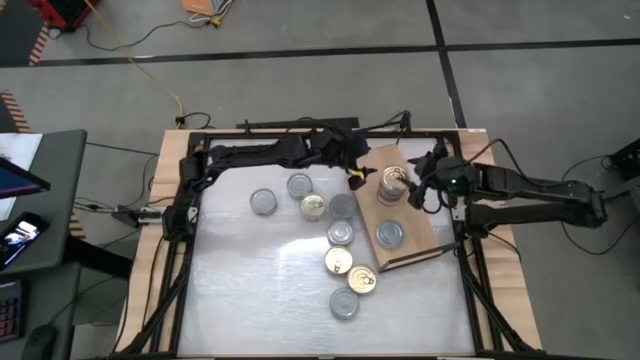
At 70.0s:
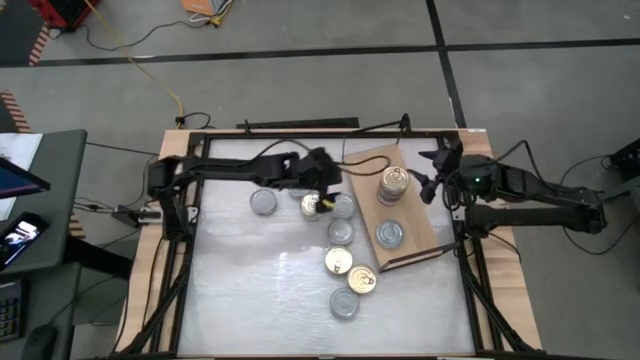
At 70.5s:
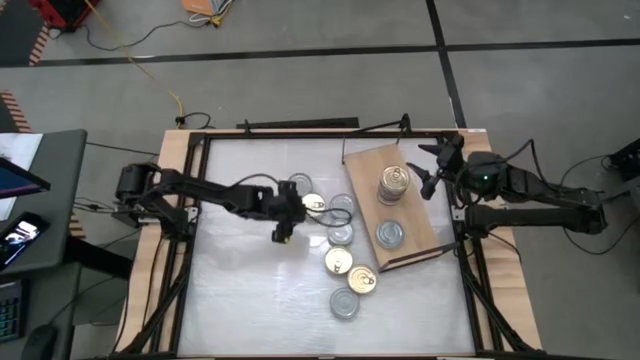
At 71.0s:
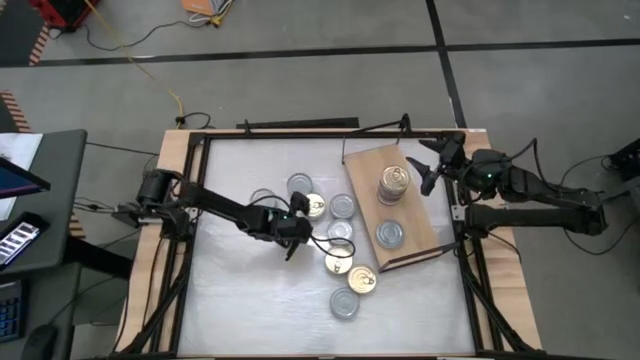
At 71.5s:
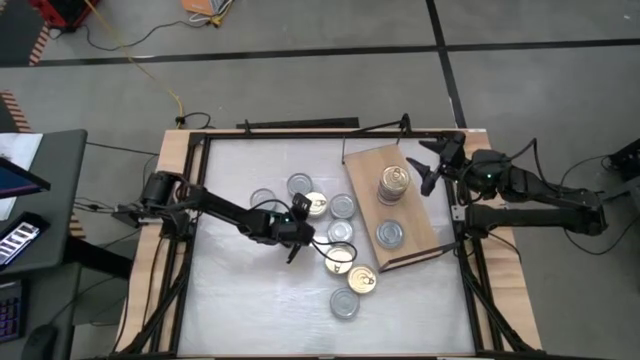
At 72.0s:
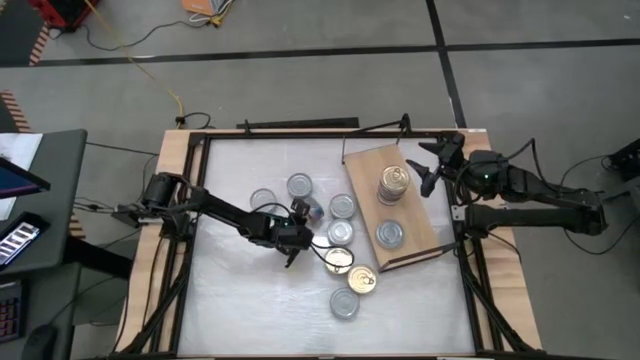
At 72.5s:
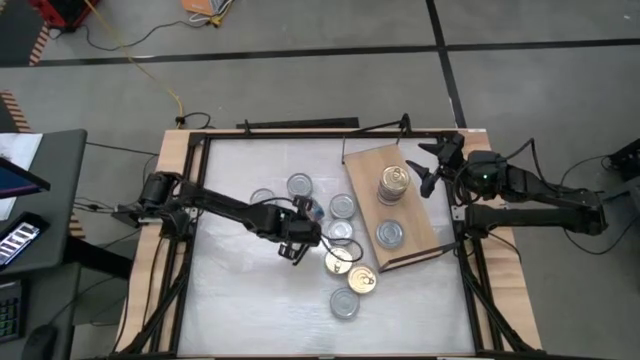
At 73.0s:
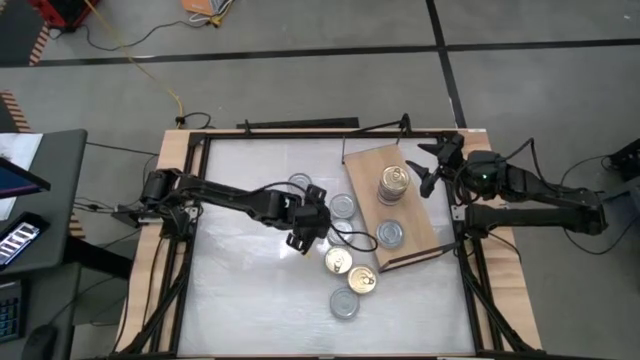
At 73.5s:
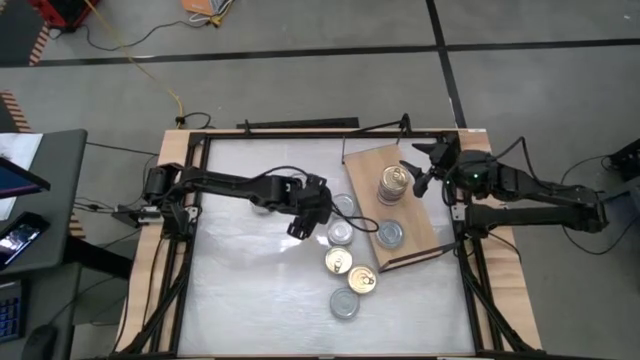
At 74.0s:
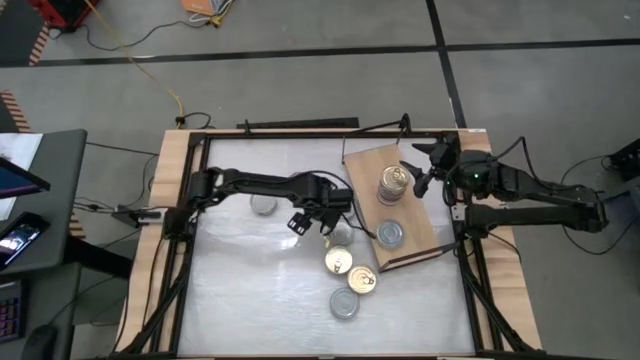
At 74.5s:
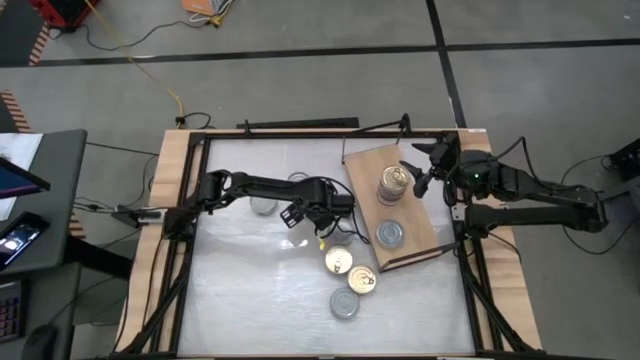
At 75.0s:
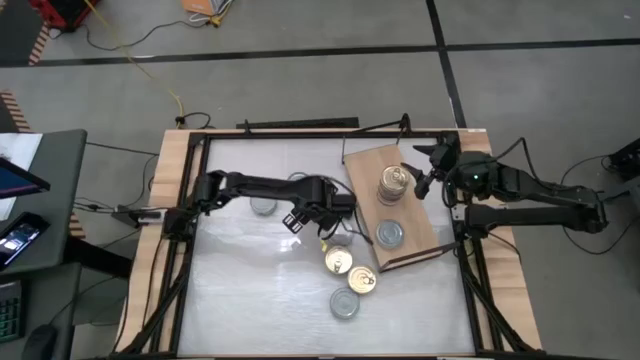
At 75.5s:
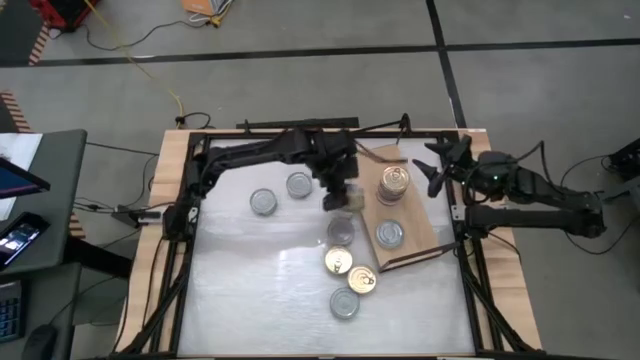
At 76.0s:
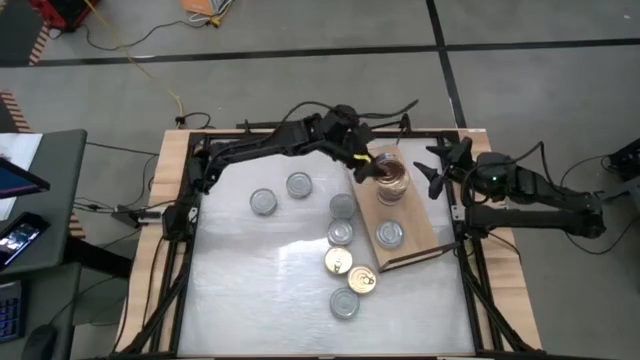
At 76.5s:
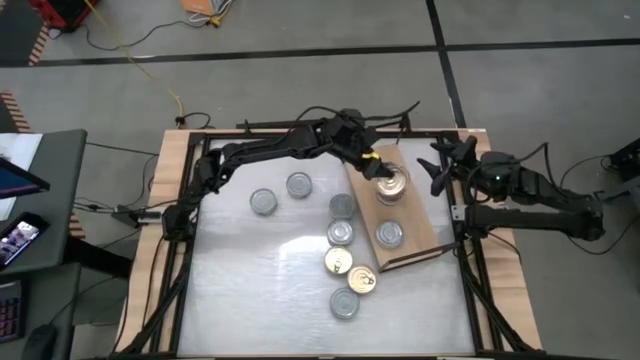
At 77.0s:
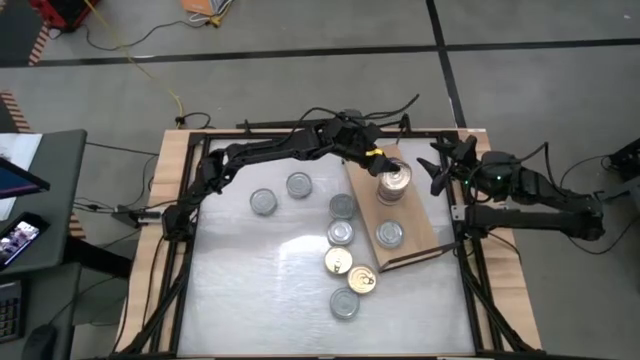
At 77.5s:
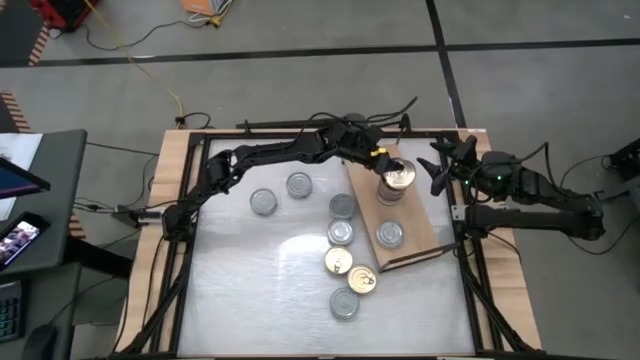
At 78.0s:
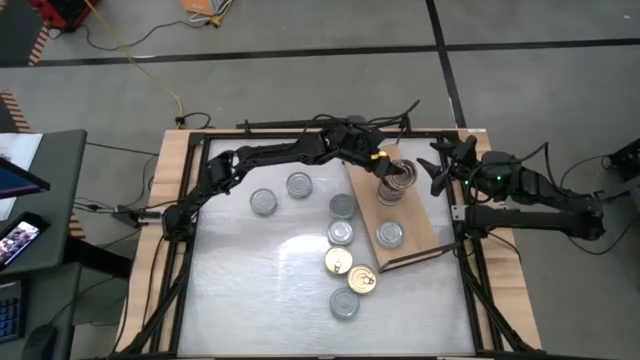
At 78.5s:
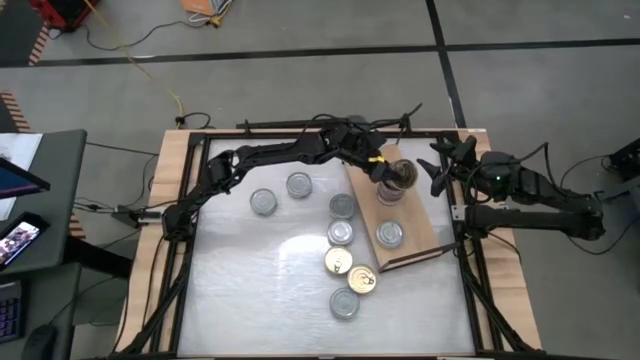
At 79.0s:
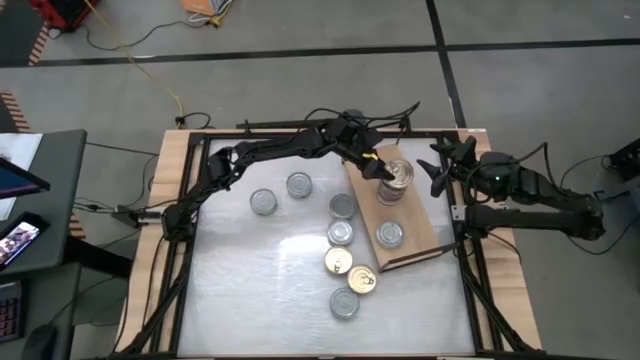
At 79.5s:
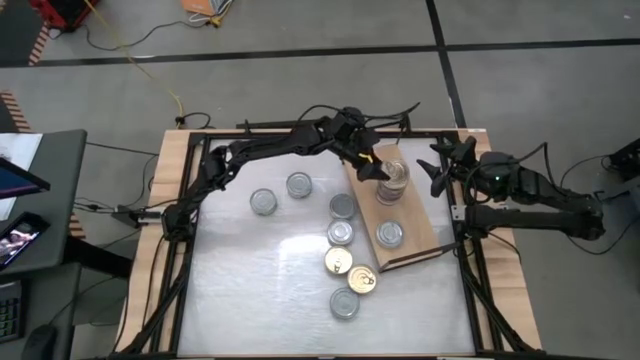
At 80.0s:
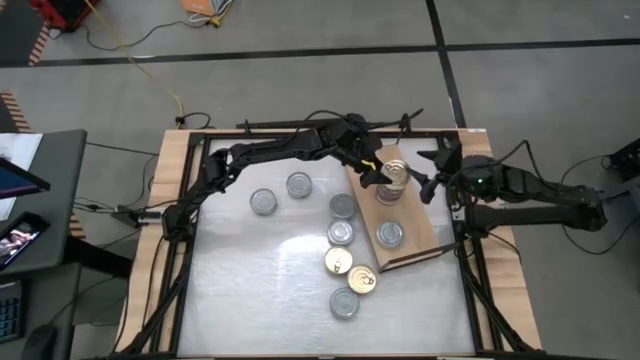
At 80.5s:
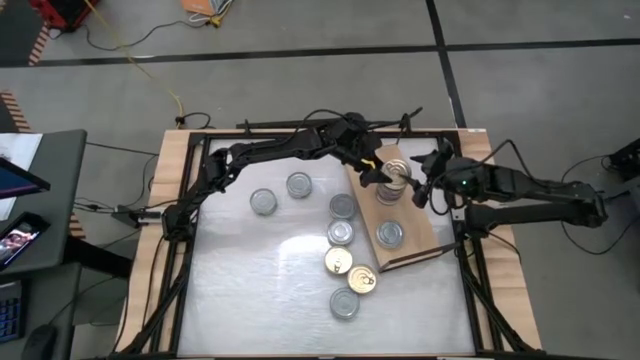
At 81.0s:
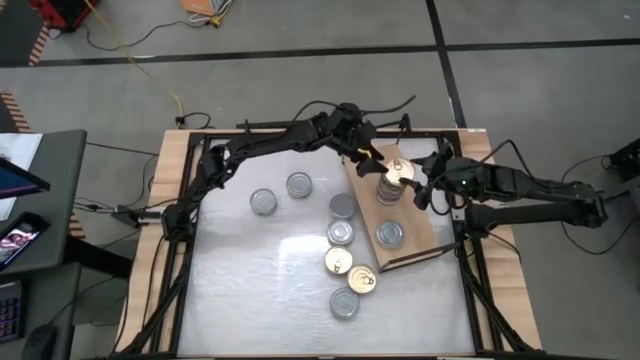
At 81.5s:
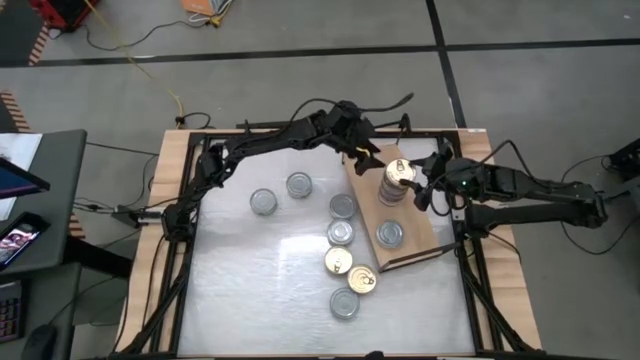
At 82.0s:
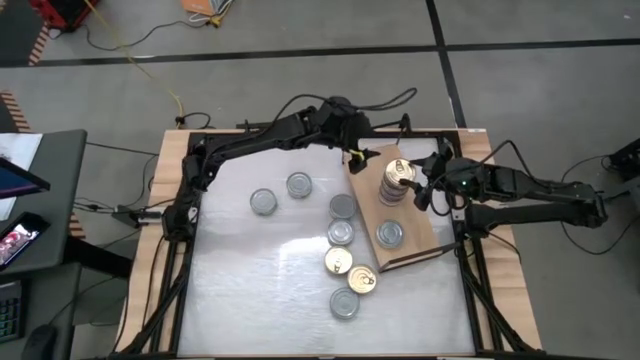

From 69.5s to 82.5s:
Task: Stack canned seafood by type on shelf
Stack the blue tuna can on the blue tuna can on the shelf

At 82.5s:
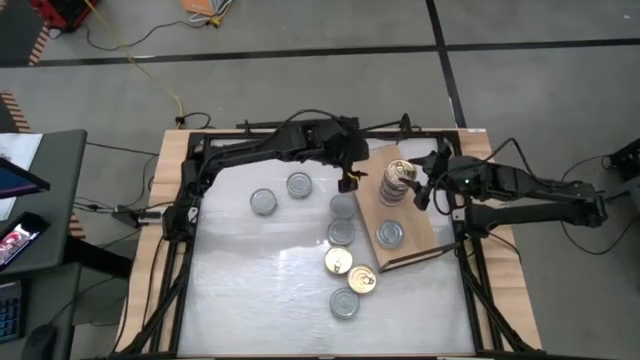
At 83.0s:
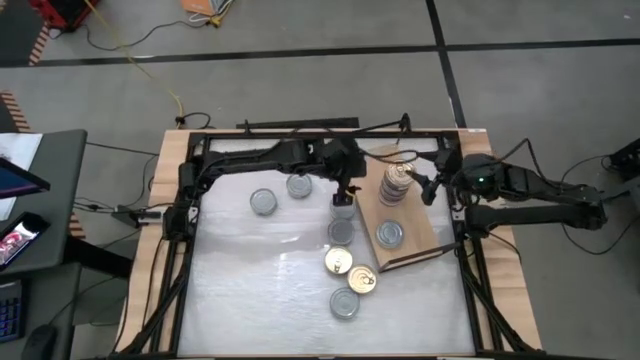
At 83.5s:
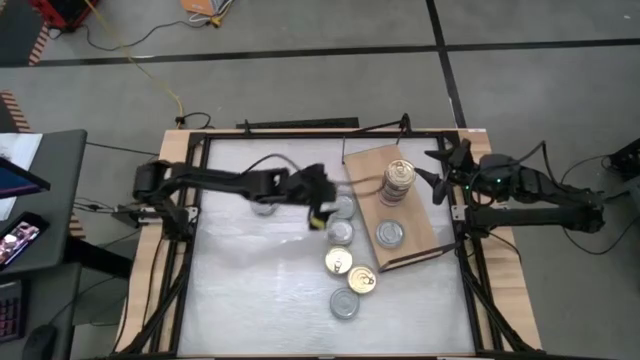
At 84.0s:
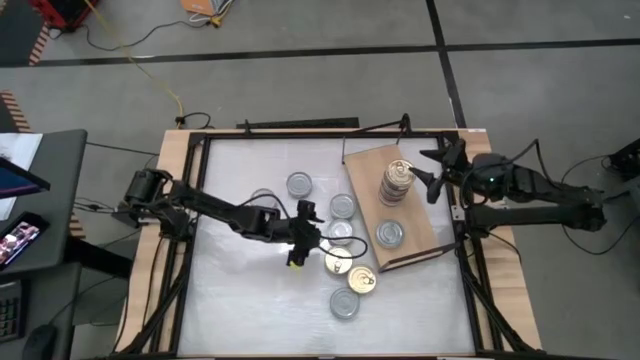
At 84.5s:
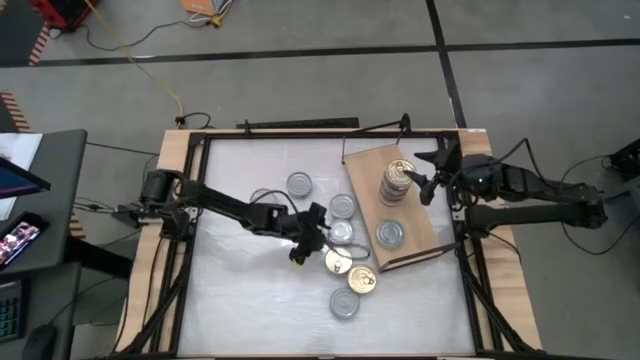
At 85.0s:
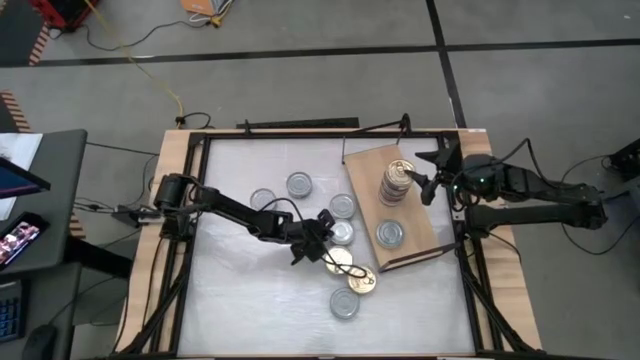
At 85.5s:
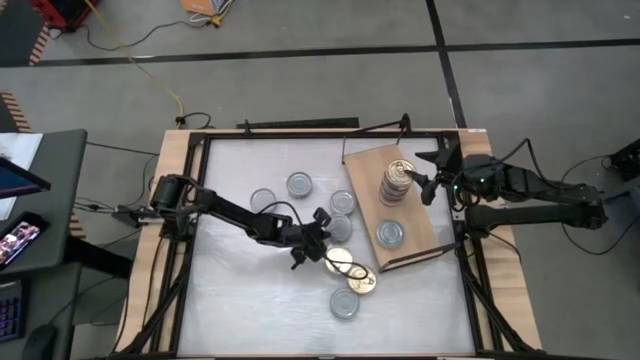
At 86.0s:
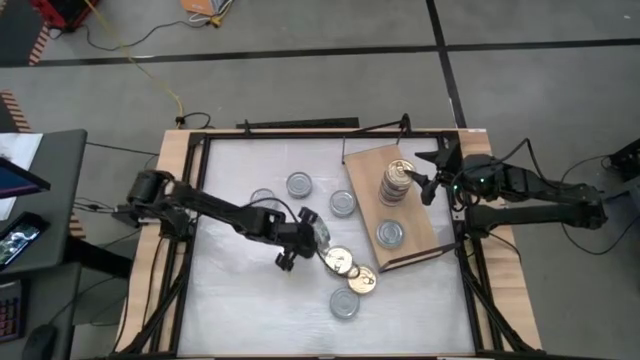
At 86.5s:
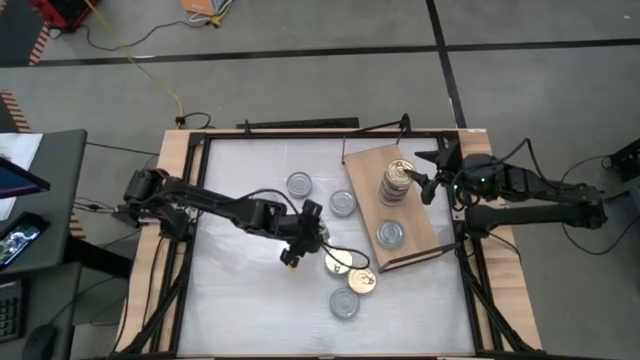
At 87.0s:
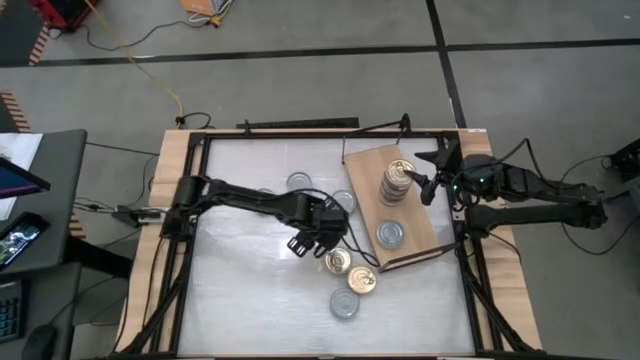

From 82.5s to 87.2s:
Stack the green tuna can on the green tuna can on the shelf

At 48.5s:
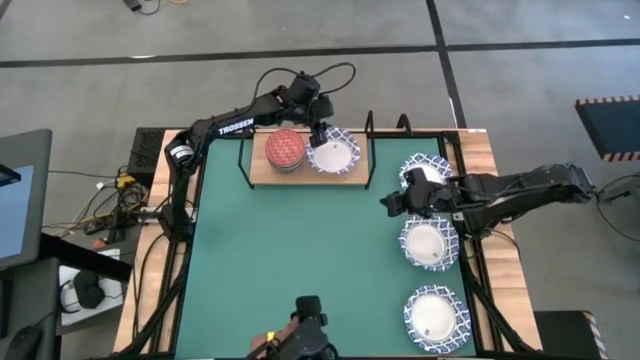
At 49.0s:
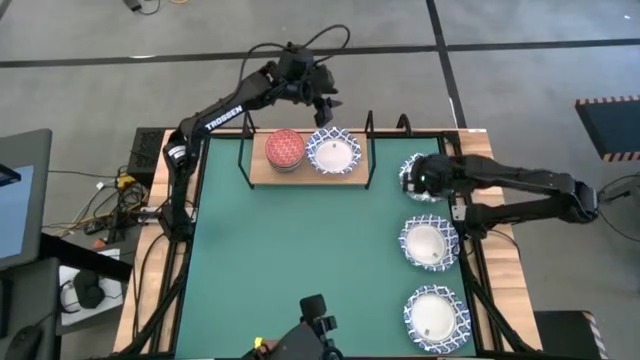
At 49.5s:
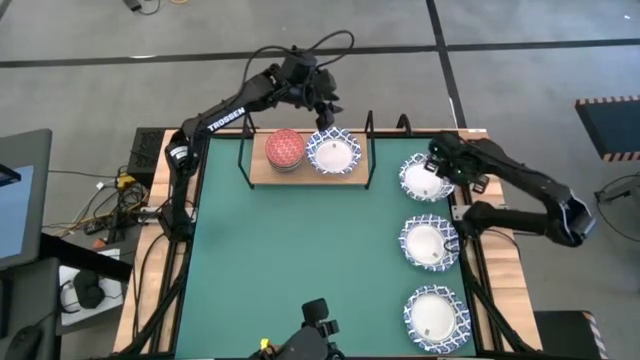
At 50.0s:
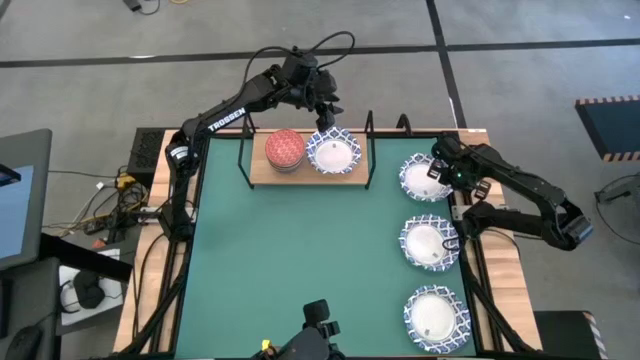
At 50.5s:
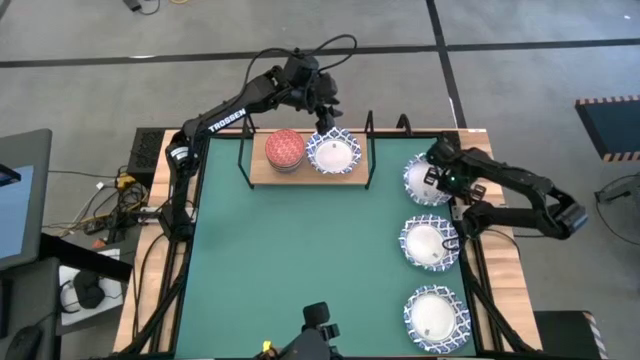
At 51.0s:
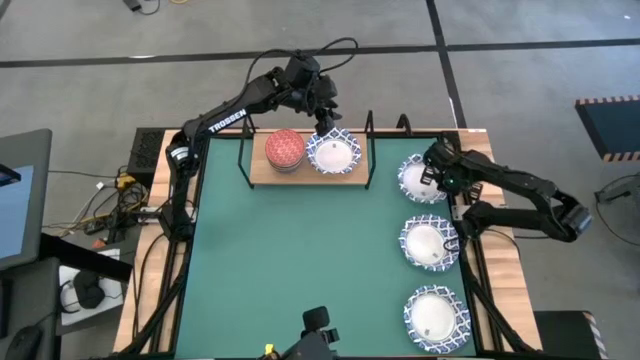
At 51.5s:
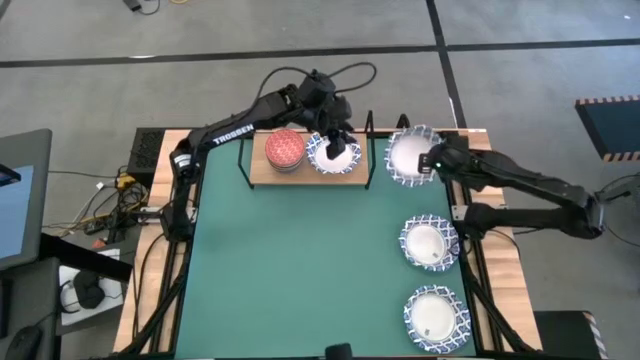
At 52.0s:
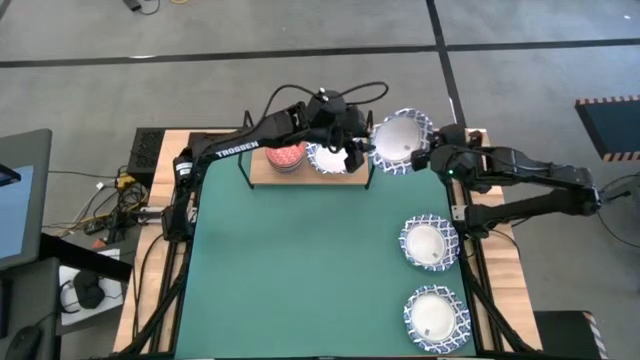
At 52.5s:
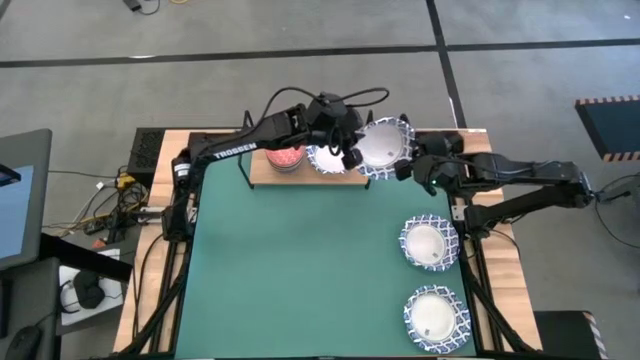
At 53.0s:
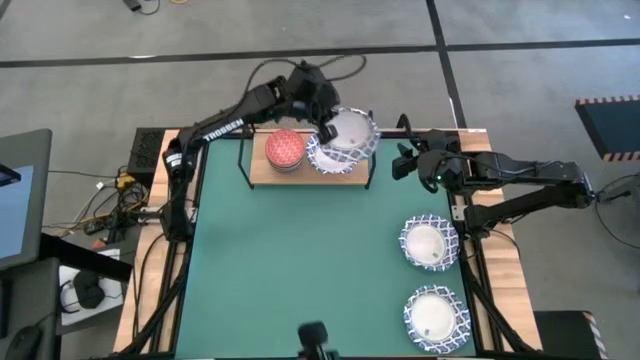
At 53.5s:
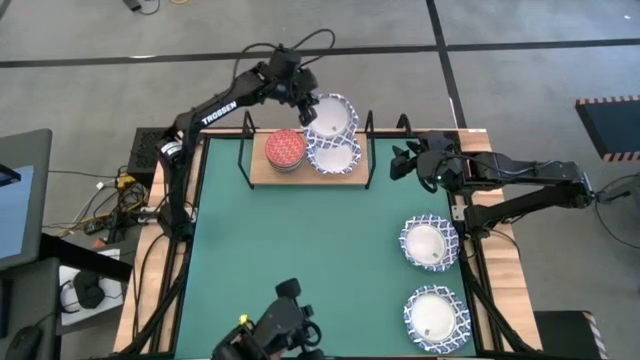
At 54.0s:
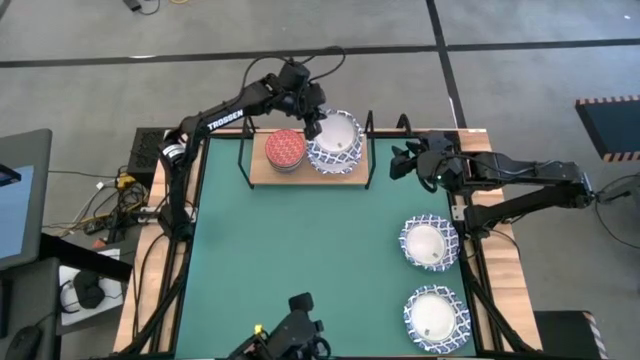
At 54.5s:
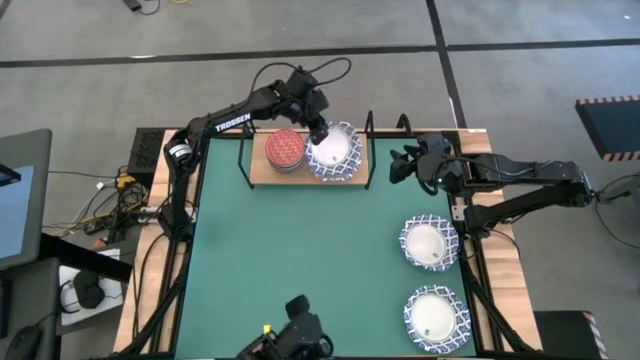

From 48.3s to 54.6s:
Task: Place and stack bowls onto a shelf
Stack the white blue bowl on top of the white blue bowl on the shelf
